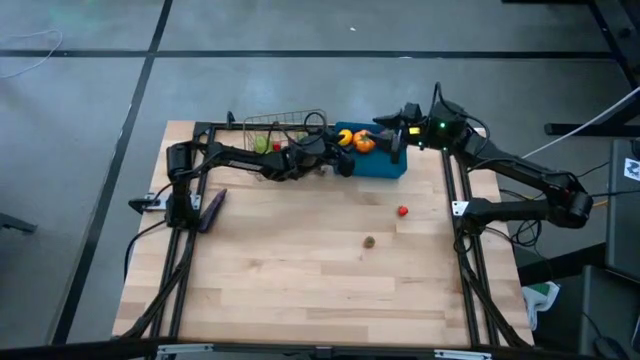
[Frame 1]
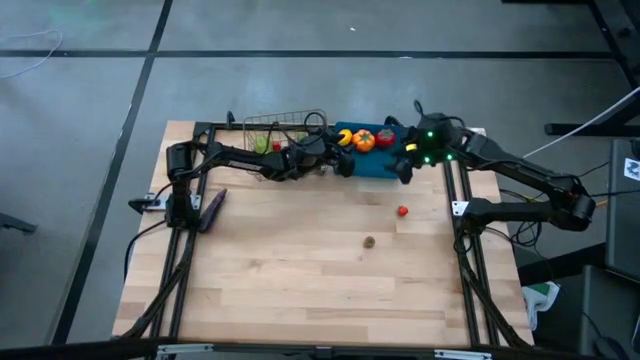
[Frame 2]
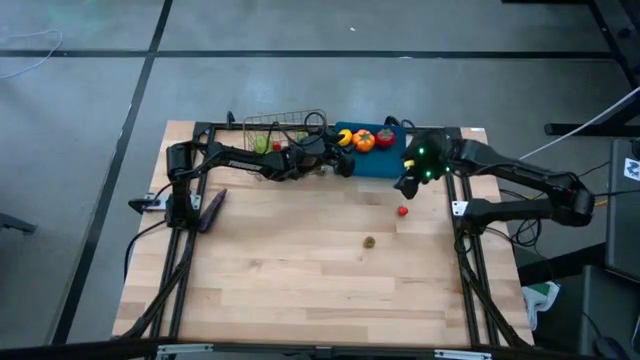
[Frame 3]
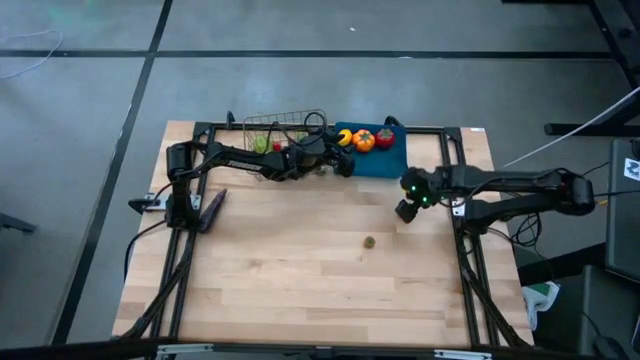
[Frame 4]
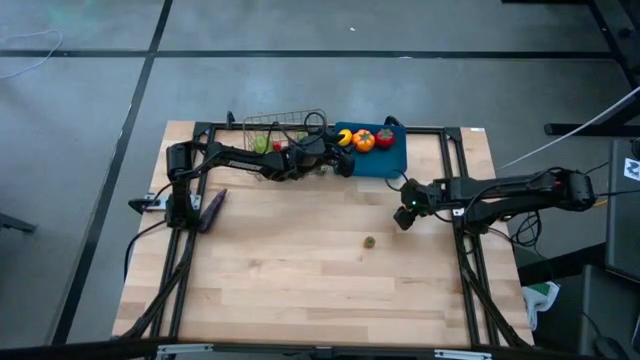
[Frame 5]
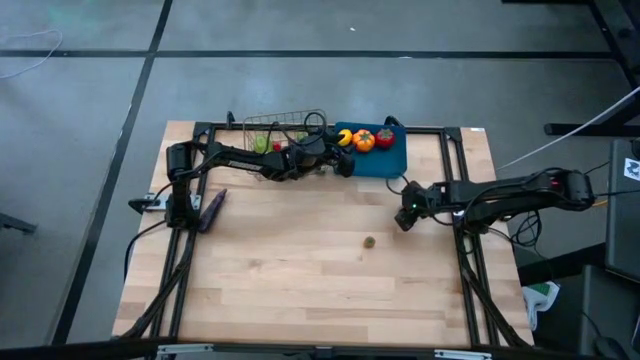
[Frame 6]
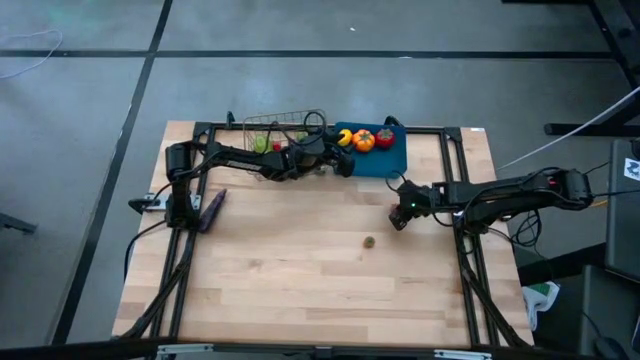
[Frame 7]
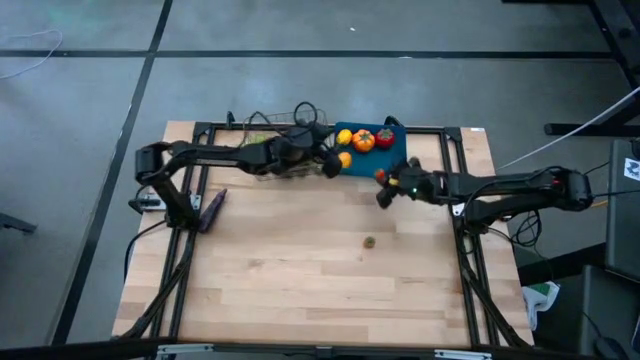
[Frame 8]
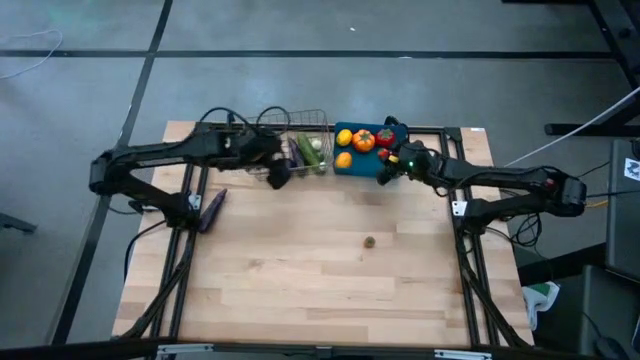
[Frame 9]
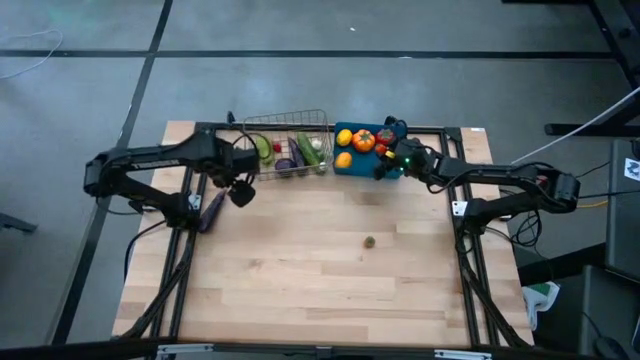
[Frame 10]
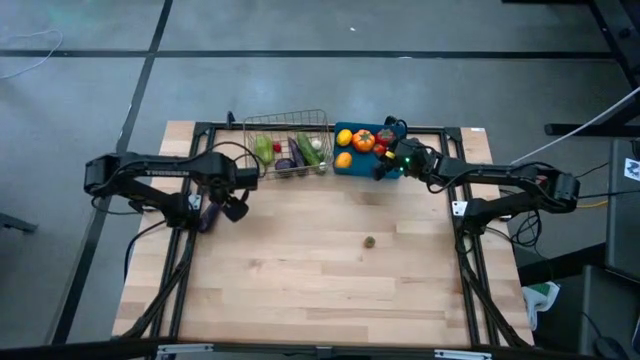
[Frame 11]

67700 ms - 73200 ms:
Task: Sort produce into baskets
Put the top small tomato in the blue bin

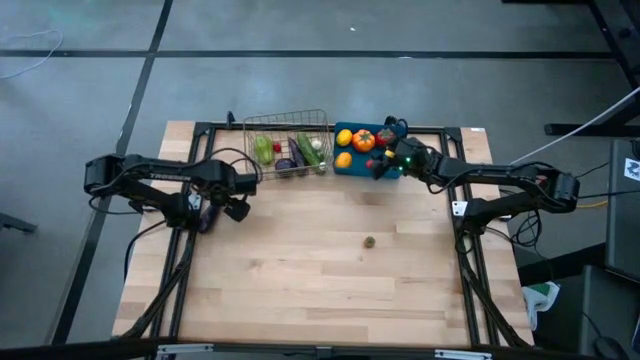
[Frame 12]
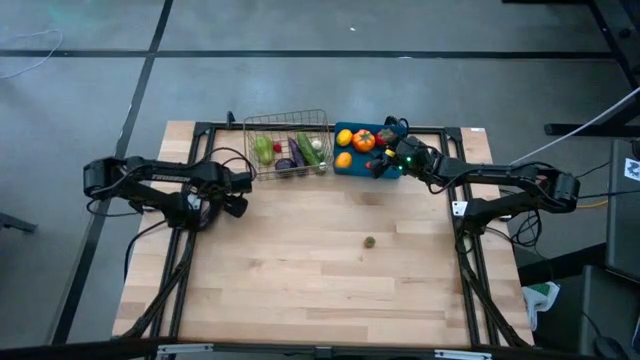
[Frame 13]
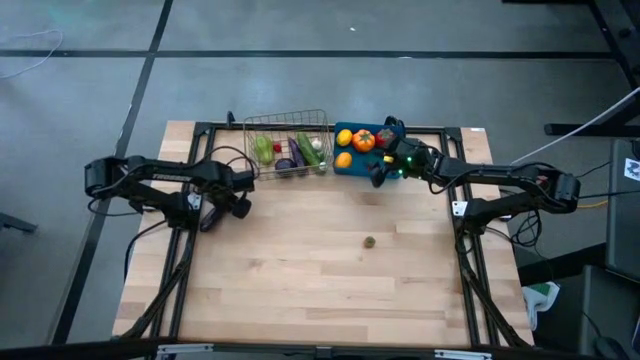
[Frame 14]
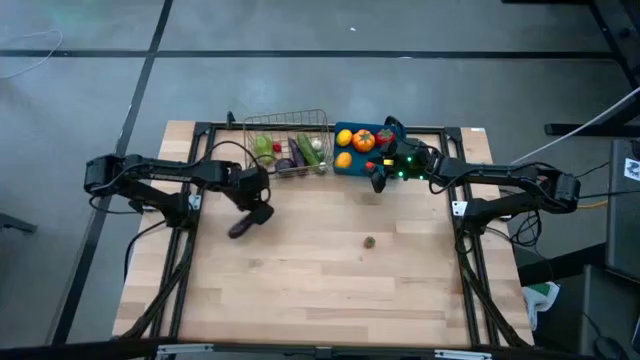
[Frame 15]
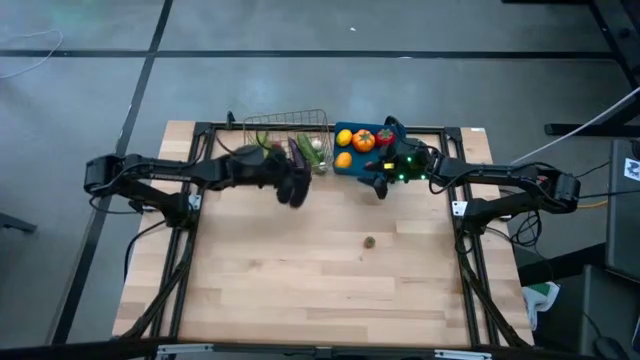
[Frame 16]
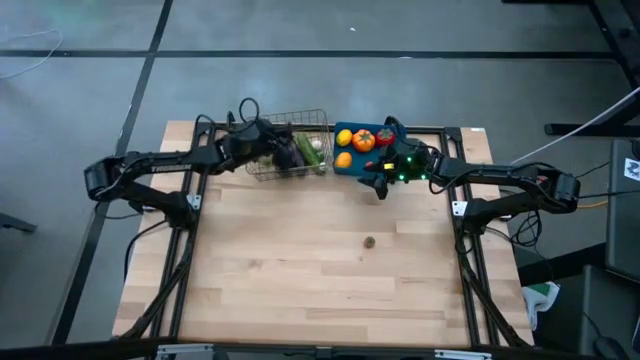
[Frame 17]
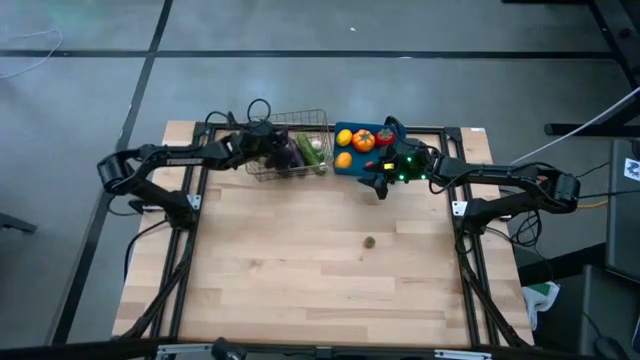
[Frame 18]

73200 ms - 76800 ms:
Put the eggplant into the wire basket

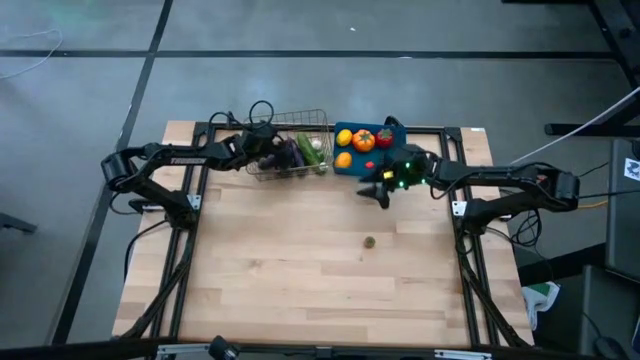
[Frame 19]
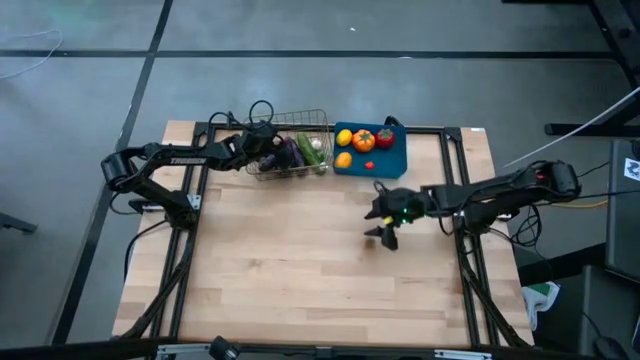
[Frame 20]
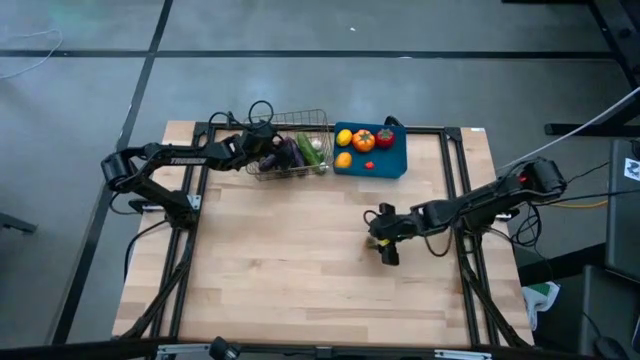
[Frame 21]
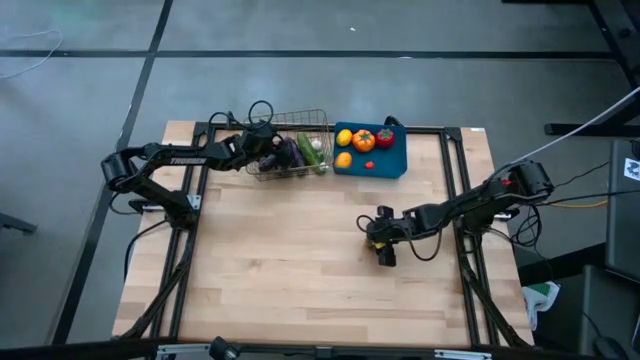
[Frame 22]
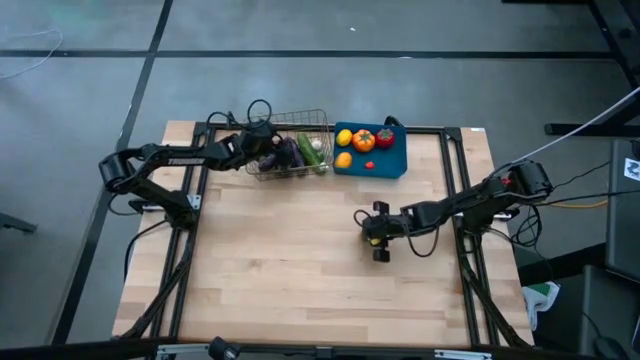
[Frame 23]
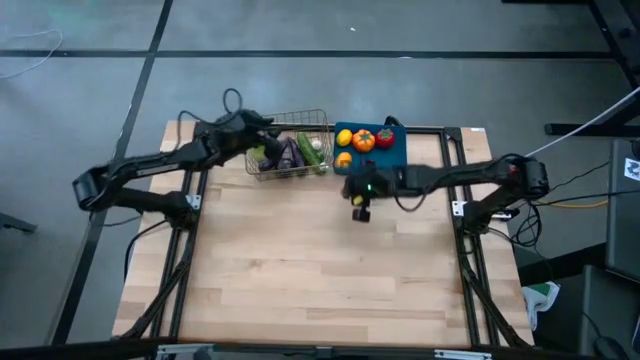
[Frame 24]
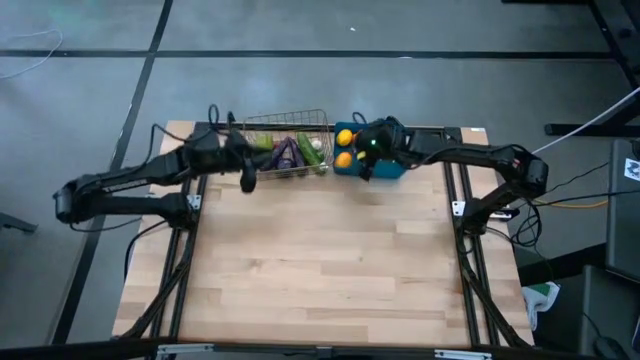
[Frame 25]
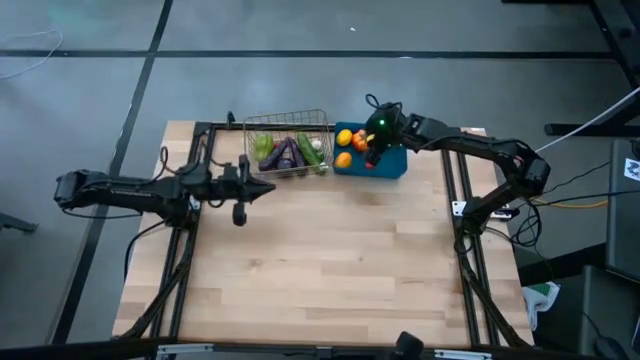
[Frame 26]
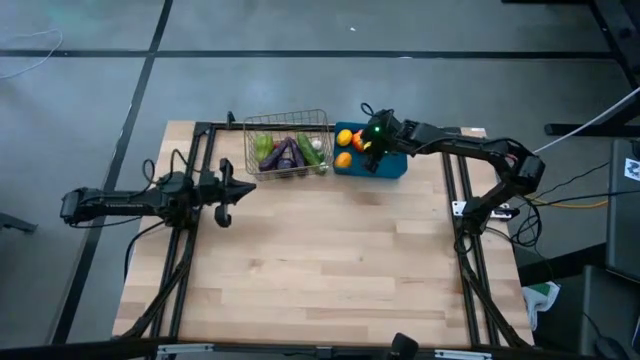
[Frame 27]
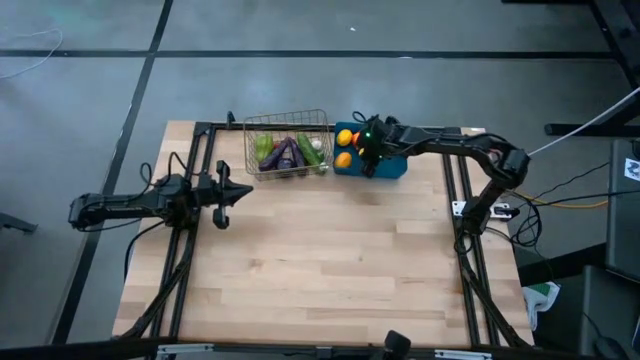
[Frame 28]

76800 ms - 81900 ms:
Put the small tomato into the blue bin

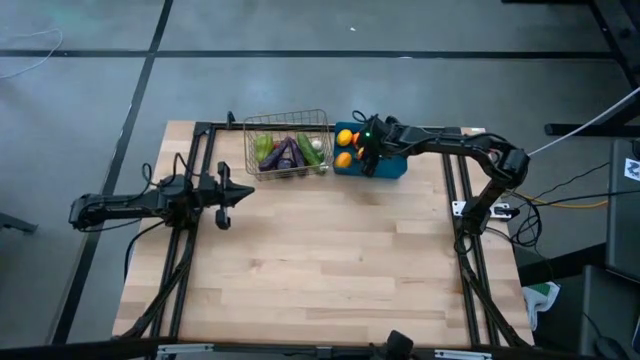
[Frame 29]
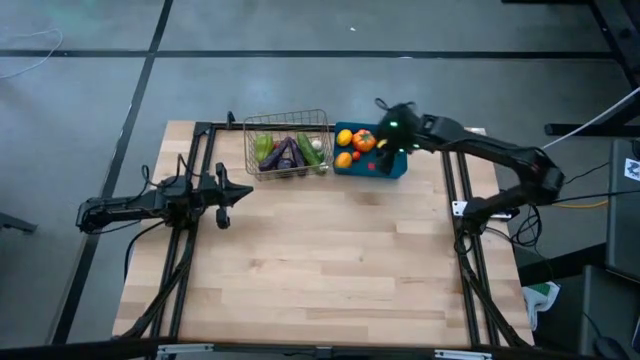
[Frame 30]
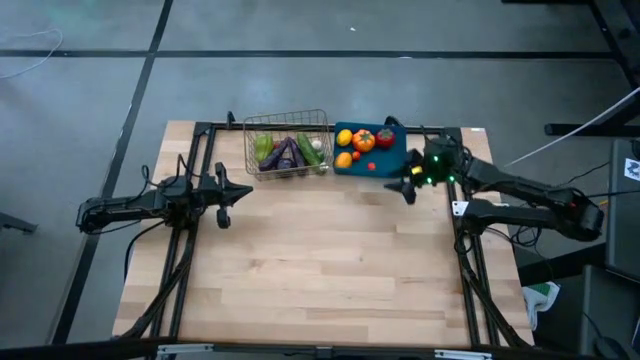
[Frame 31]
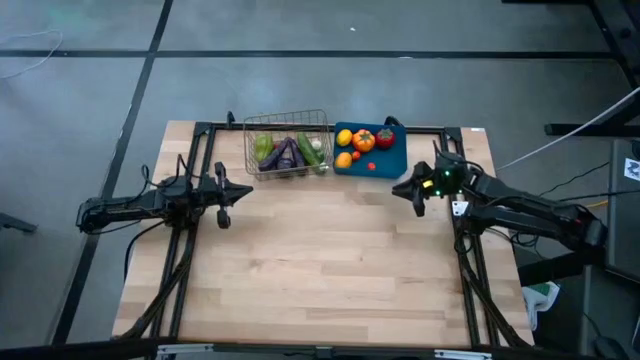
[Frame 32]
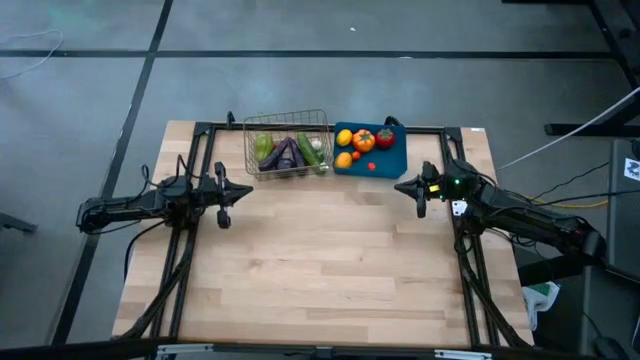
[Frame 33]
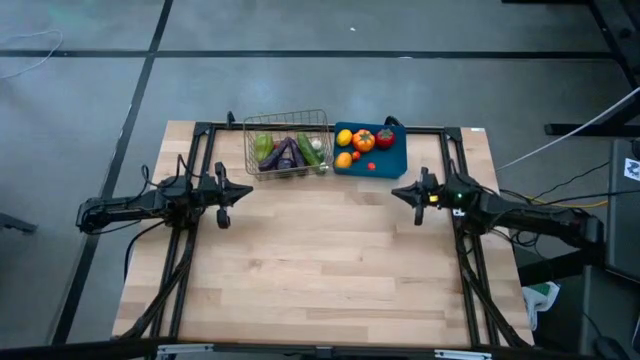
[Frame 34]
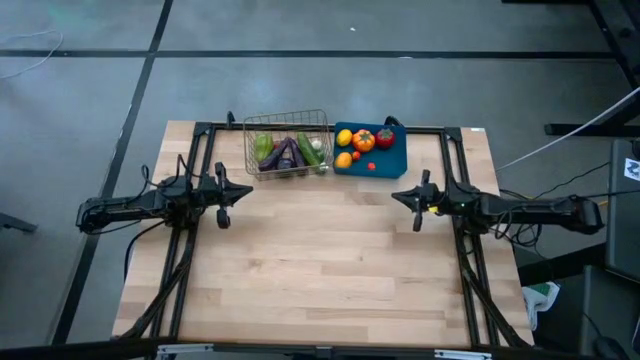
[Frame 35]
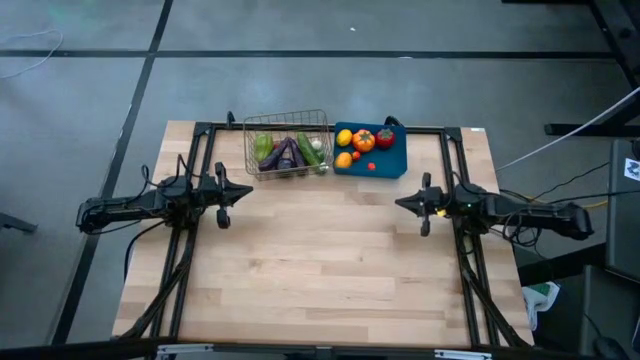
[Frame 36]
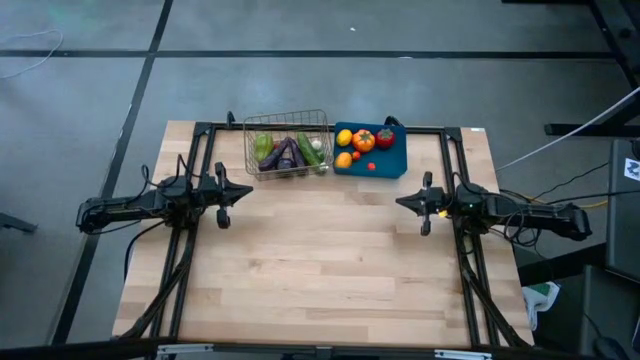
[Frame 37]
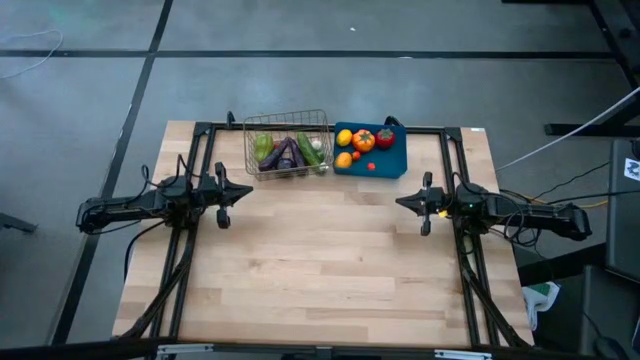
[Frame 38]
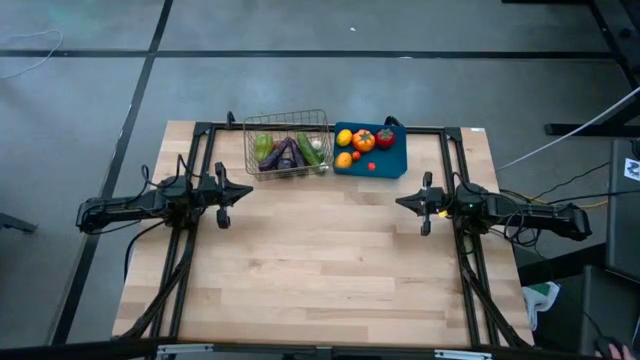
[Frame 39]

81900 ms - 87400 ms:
Return to Home Position

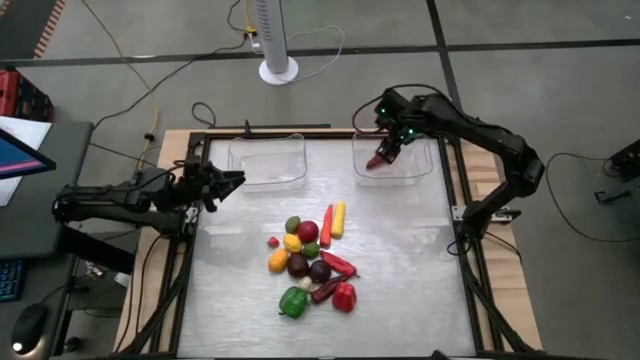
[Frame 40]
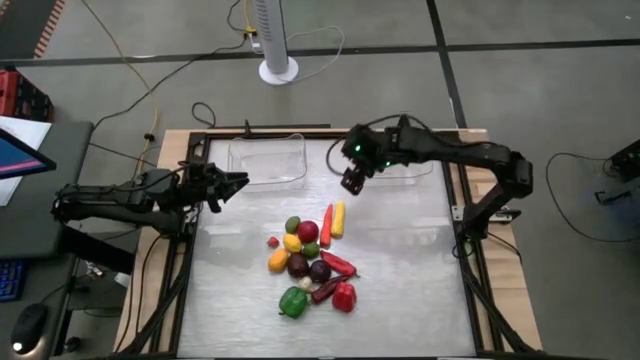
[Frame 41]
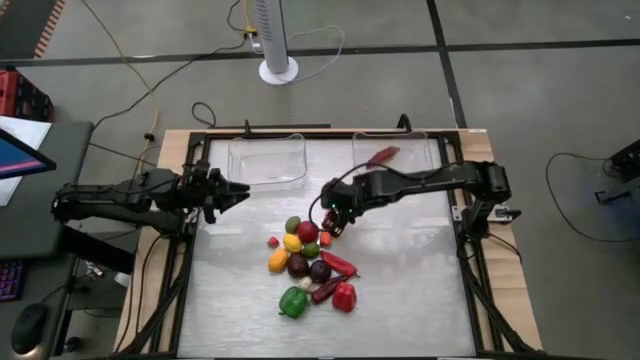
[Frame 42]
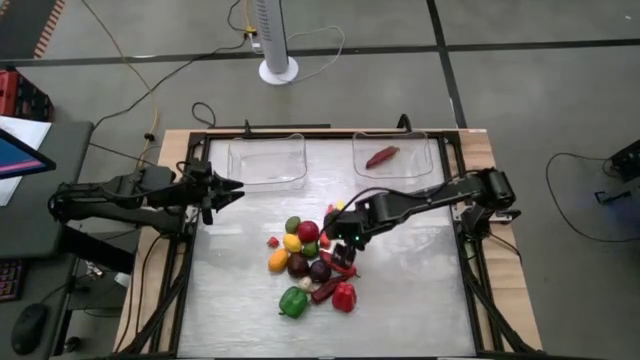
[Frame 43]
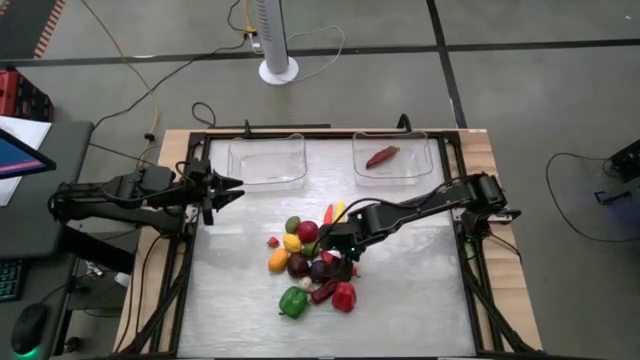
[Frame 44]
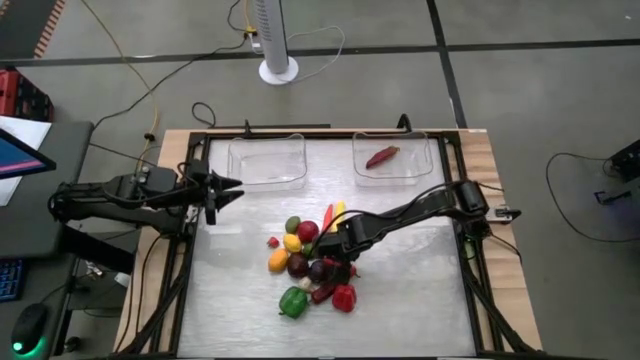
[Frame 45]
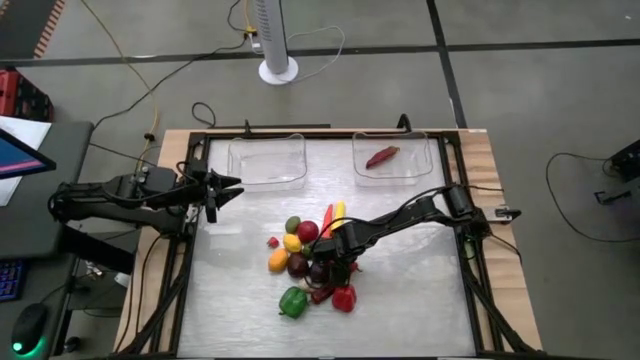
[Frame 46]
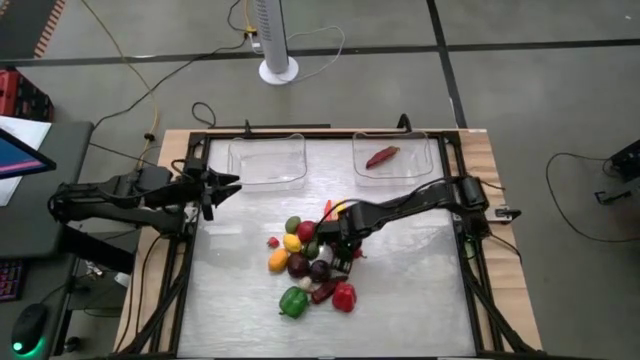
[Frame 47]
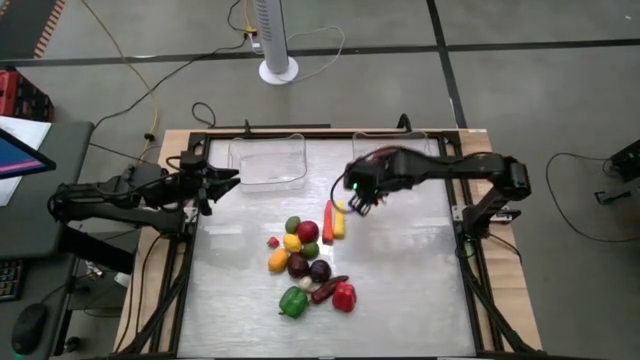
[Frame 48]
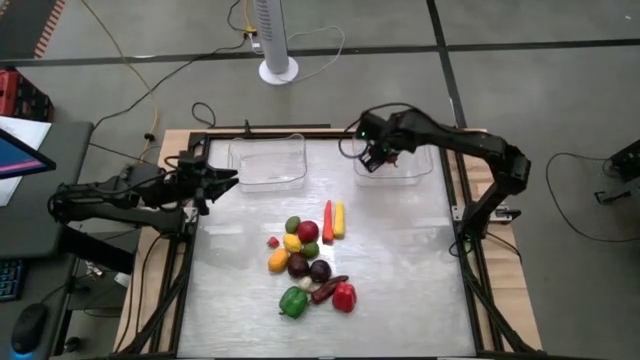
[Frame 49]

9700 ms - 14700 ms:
Task: Sort produce into baskets
Put the red chili pepper into the right transparent bin
